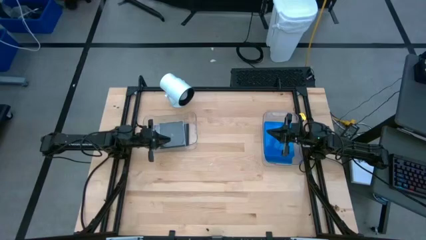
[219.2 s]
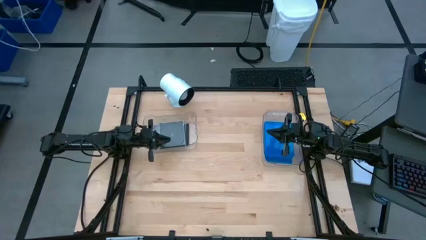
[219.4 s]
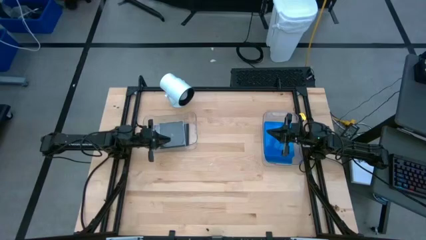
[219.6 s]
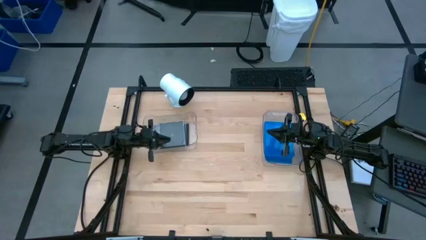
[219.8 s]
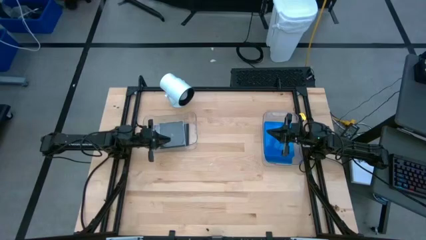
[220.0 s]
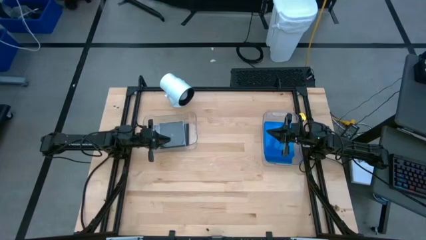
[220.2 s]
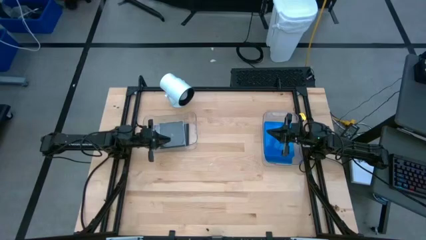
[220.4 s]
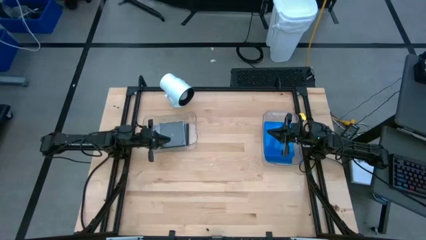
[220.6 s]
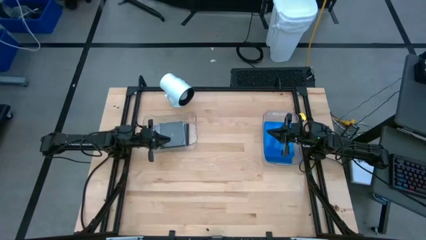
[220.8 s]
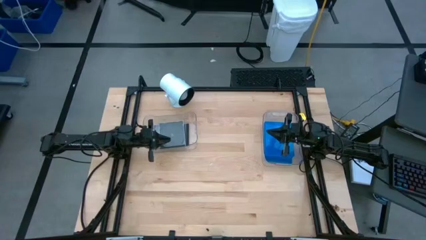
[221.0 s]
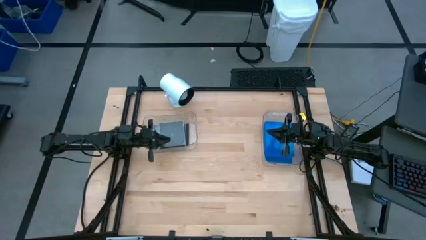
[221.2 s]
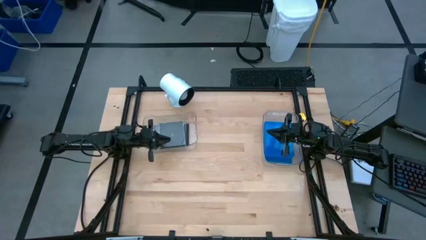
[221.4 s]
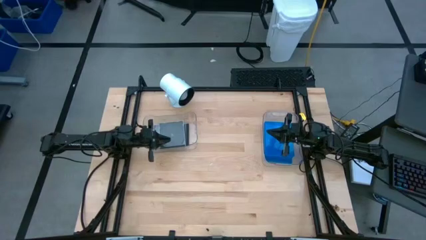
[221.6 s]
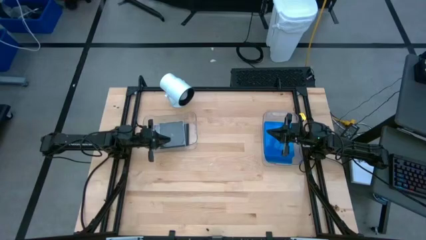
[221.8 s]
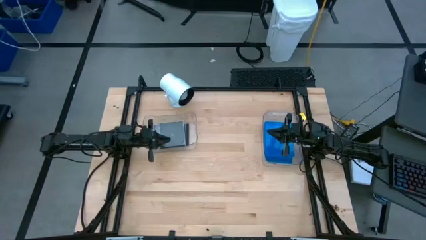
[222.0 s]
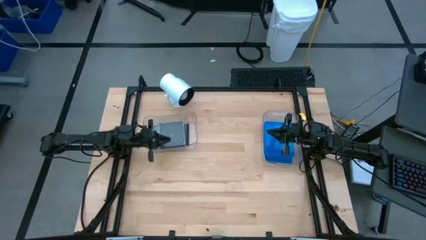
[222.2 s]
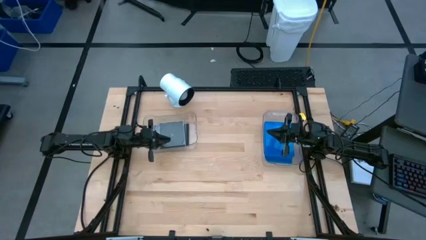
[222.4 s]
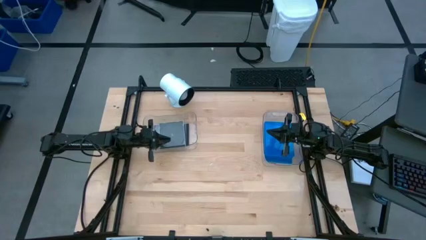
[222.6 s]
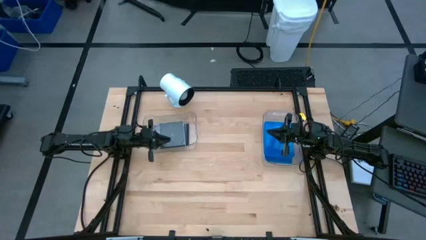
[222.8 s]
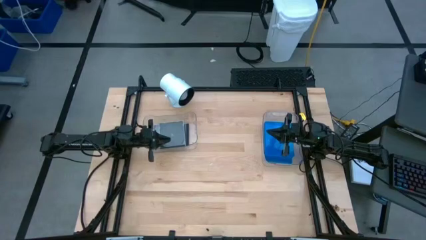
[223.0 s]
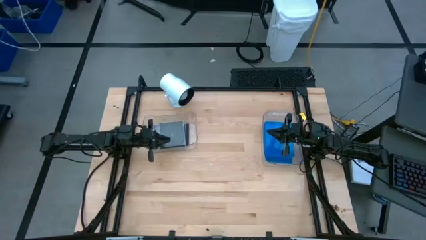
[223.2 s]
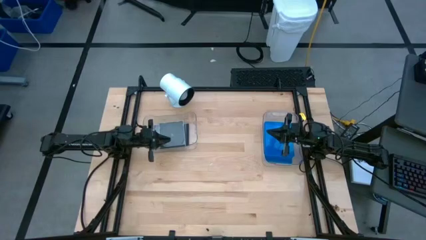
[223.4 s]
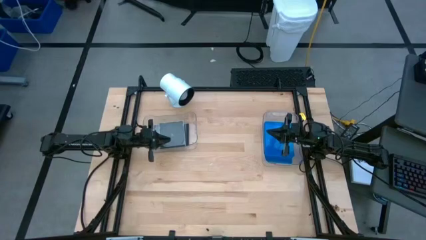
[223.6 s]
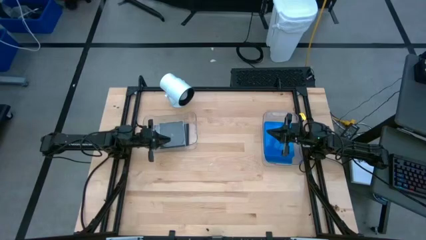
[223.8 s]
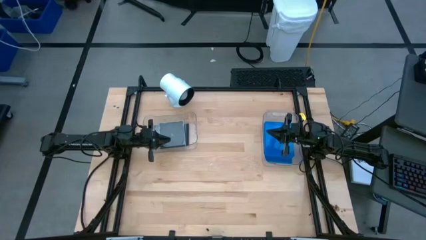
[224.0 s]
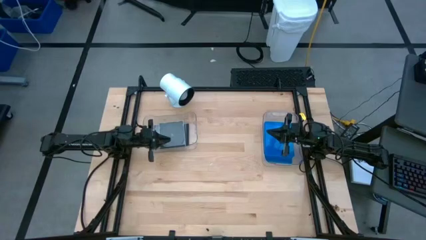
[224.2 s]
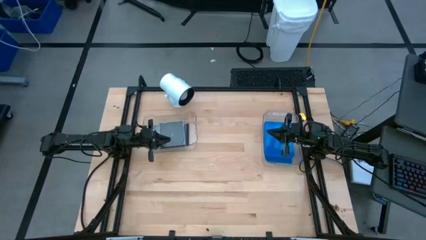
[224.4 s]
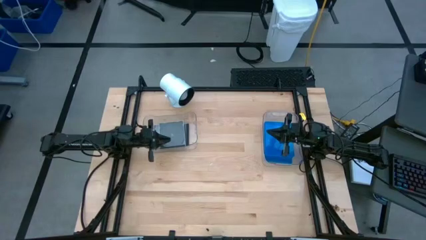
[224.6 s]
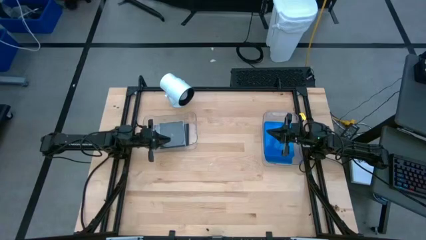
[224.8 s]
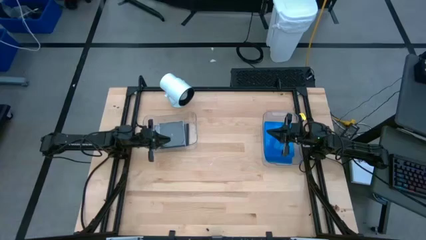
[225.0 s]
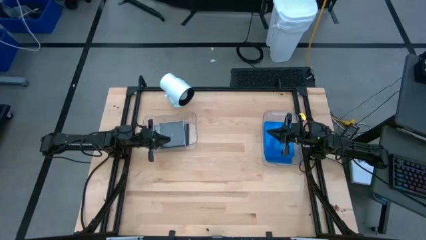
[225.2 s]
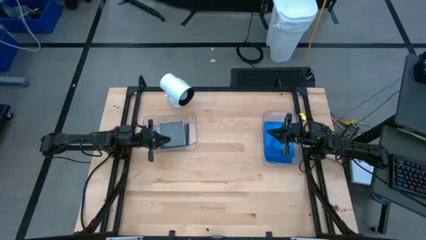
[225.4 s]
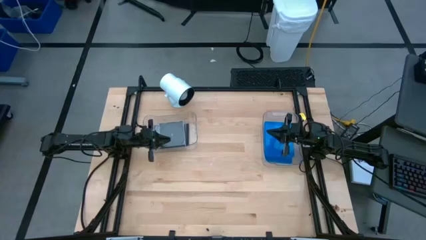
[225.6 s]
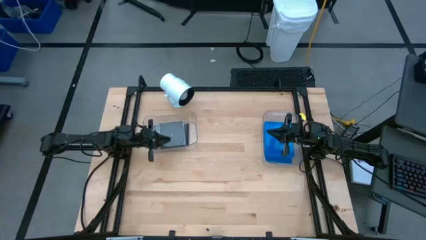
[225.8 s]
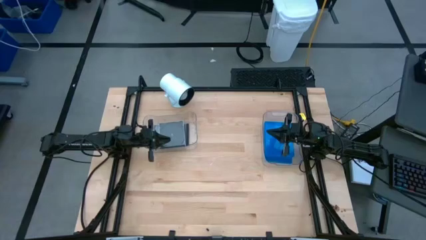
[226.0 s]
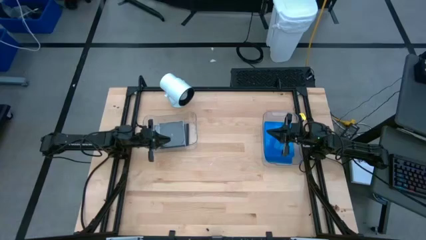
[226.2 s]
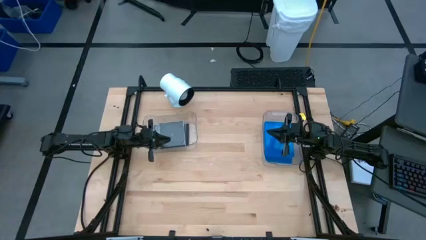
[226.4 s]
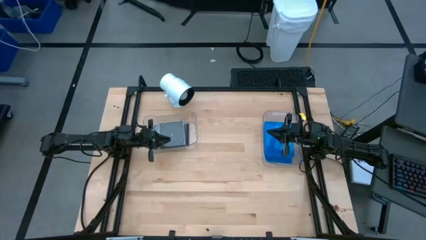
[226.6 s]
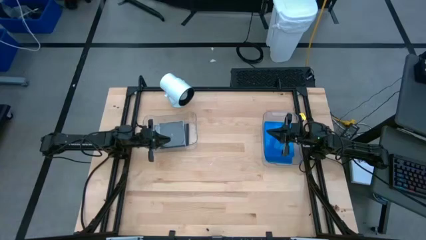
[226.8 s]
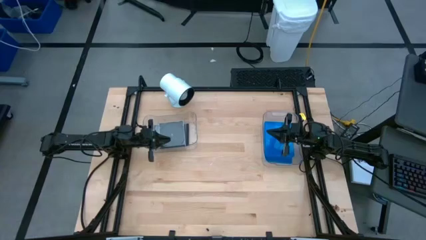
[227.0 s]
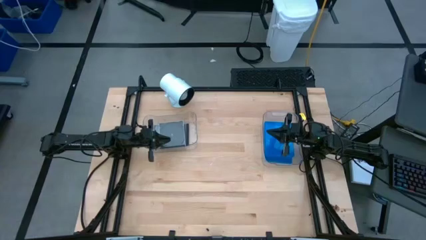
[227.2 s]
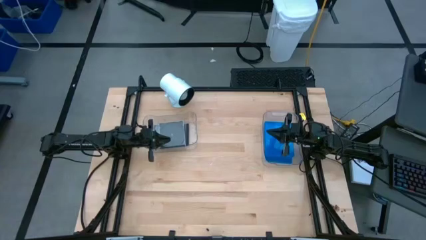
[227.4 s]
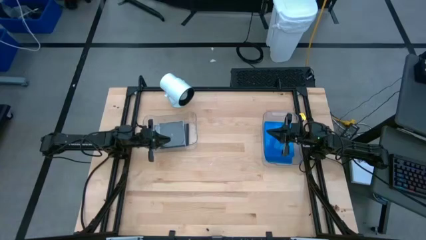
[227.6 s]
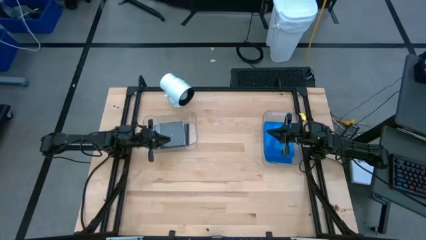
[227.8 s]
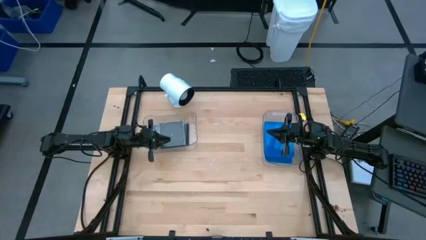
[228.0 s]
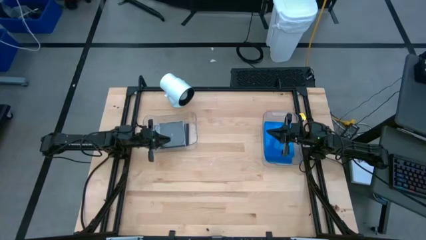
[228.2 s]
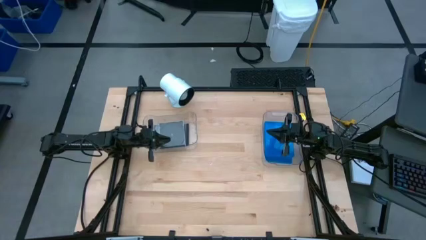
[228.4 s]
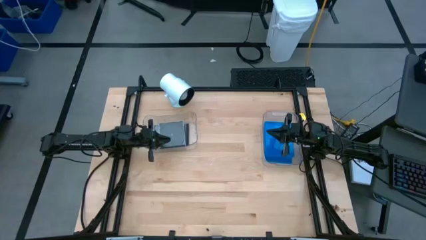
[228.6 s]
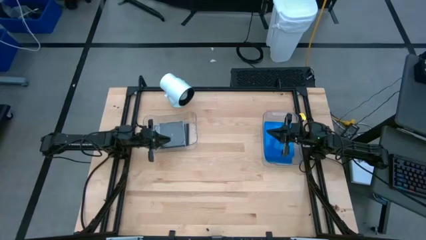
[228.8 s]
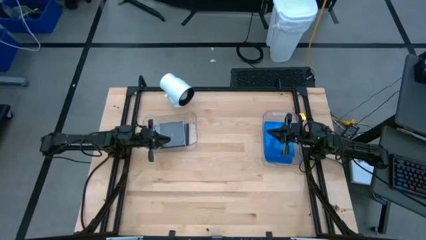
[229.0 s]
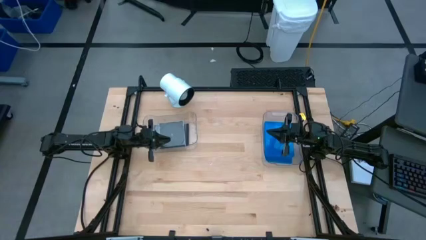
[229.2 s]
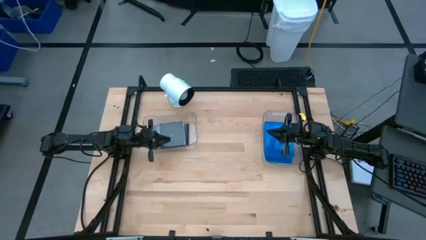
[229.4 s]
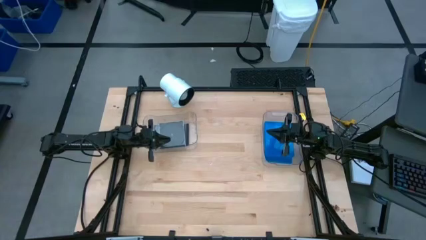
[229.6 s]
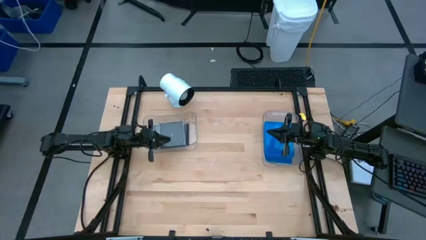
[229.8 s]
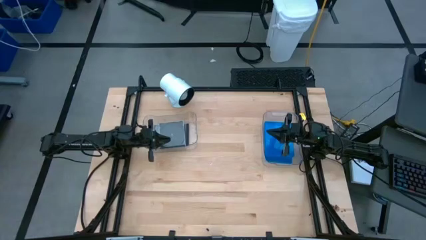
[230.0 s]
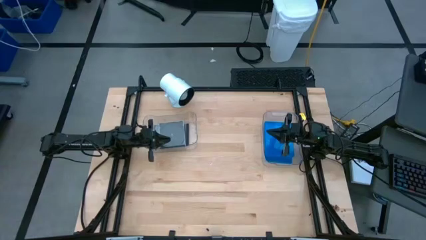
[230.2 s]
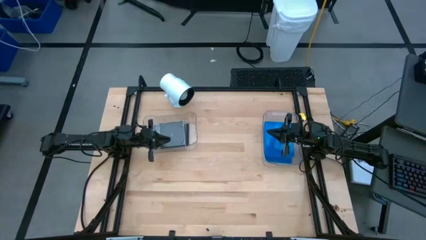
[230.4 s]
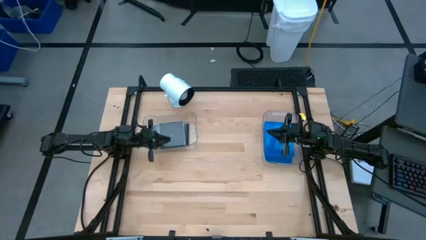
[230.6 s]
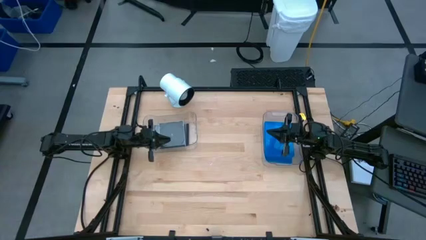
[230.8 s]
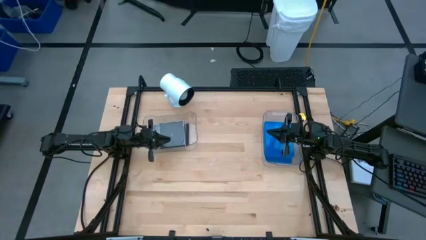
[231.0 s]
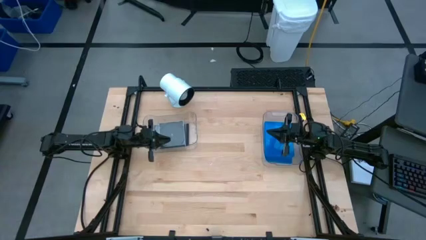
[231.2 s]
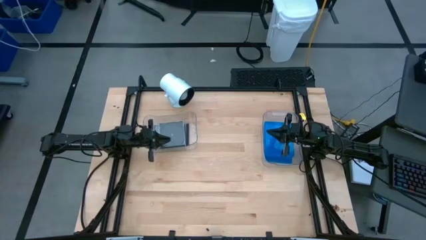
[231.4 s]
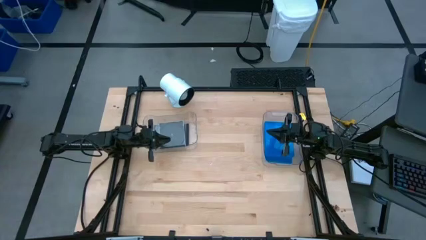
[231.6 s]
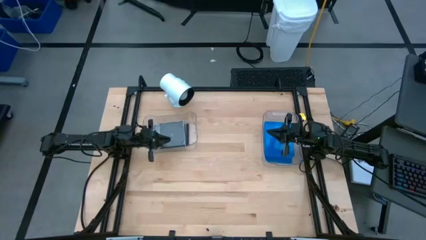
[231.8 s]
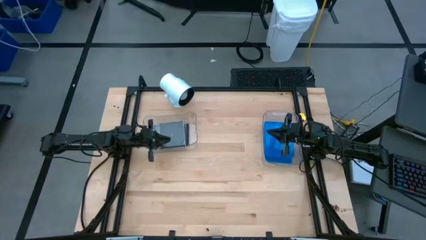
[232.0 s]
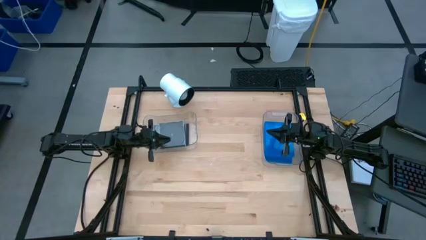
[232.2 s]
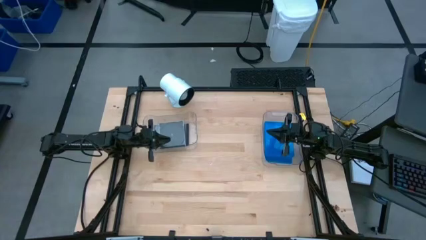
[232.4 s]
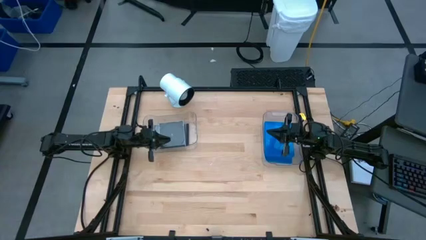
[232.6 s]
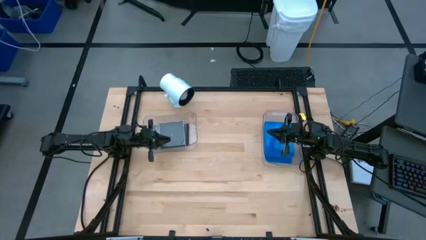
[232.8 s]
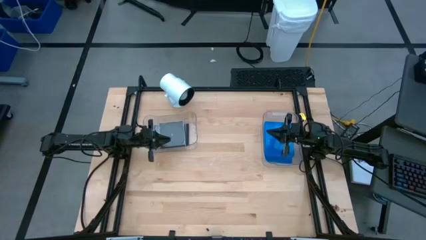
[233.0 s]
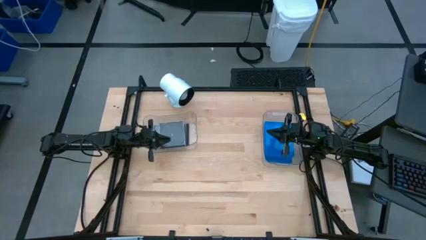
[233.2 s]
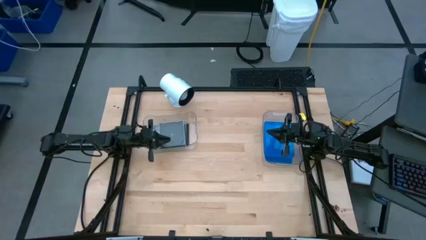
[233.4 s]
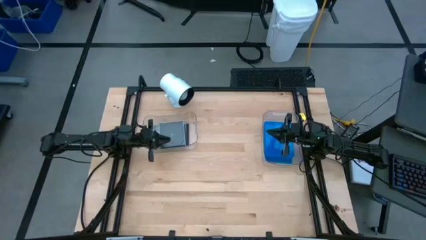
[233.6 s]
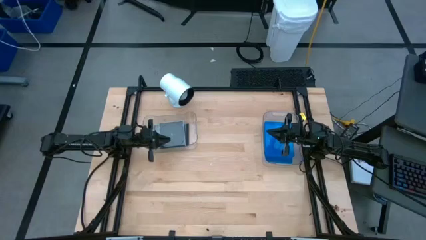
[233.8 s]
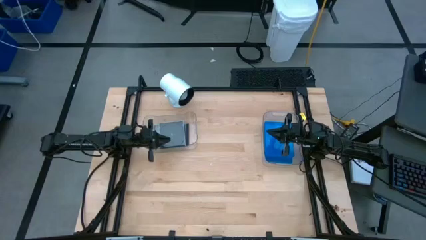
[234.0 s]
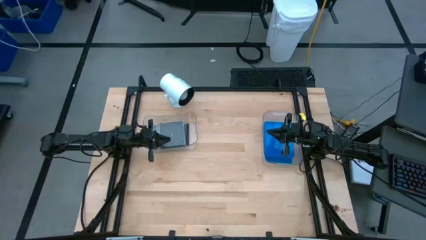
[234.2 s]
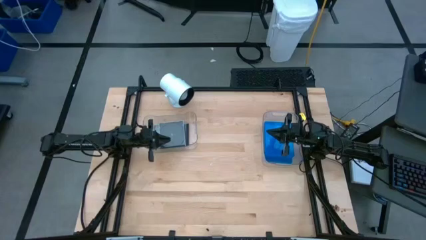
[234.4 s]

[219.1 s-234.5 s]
Task: Pick & place jewel cases by type
Return to Home Position
